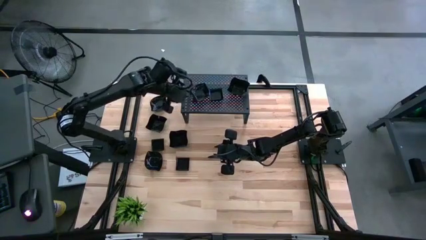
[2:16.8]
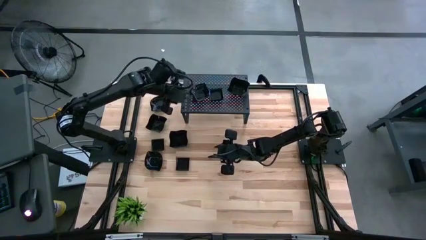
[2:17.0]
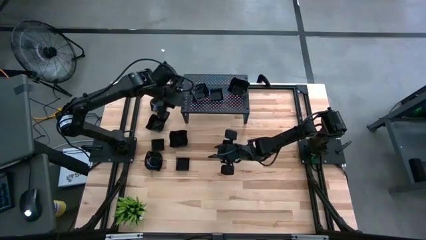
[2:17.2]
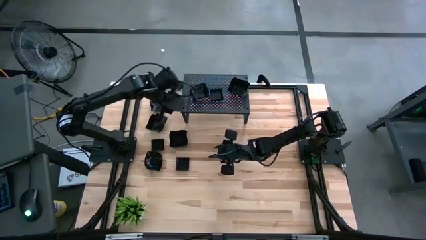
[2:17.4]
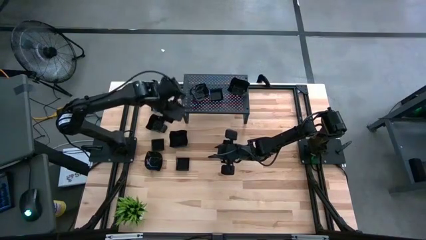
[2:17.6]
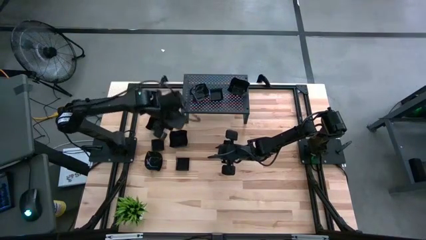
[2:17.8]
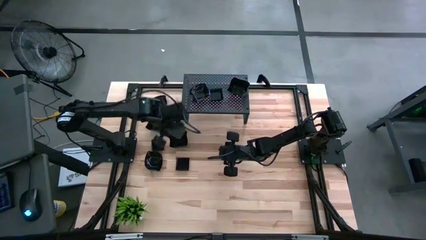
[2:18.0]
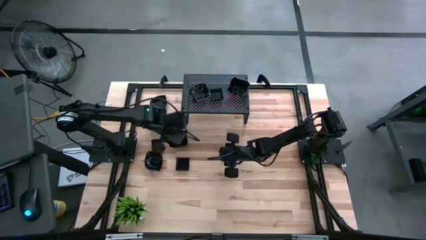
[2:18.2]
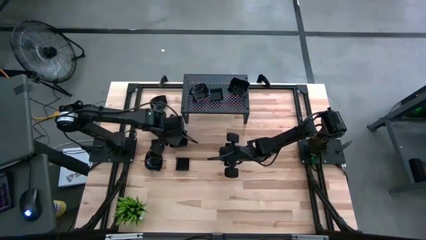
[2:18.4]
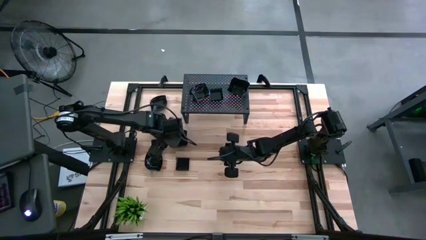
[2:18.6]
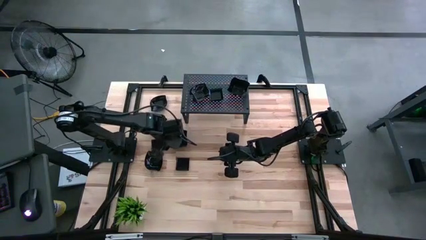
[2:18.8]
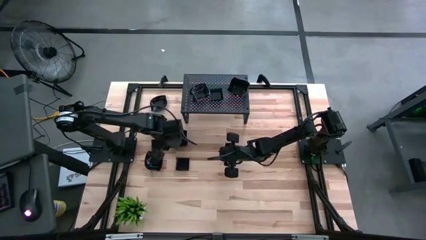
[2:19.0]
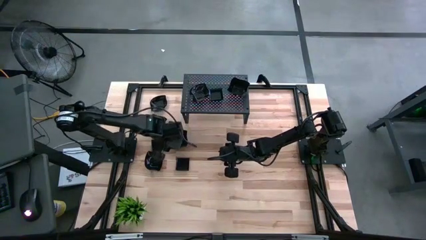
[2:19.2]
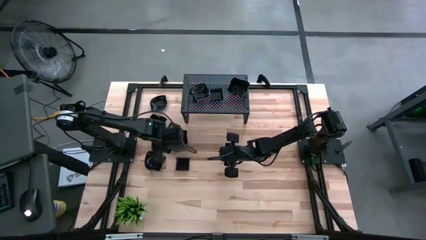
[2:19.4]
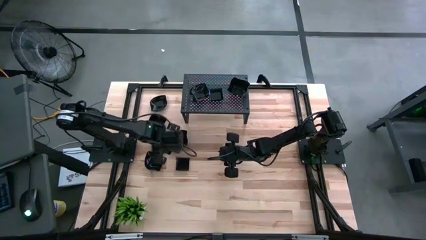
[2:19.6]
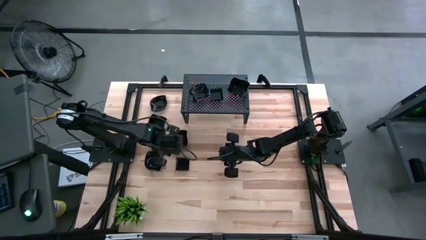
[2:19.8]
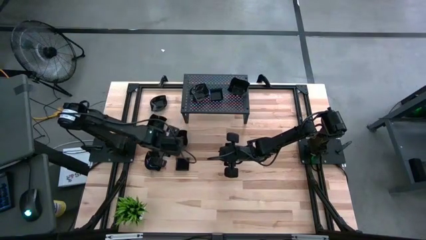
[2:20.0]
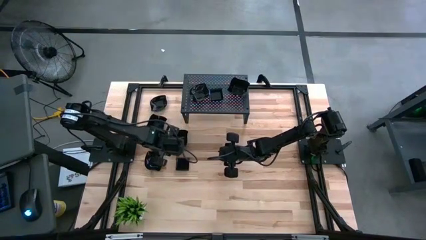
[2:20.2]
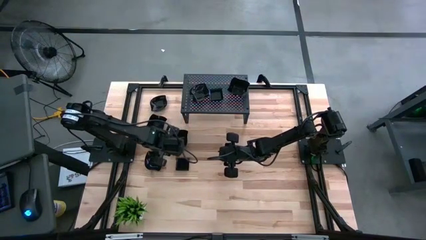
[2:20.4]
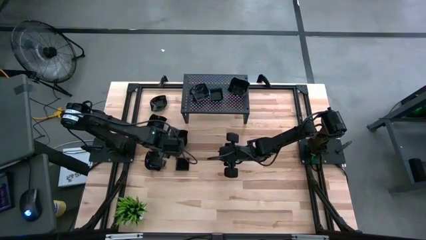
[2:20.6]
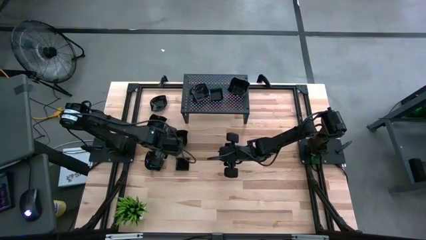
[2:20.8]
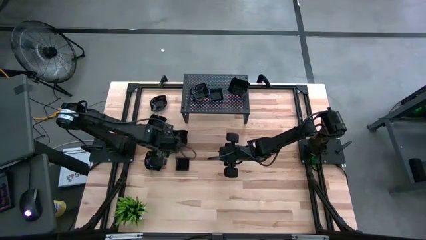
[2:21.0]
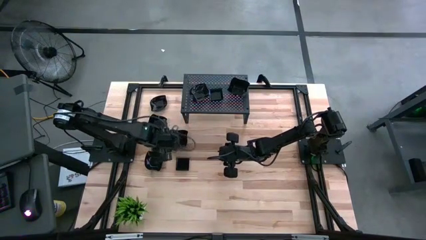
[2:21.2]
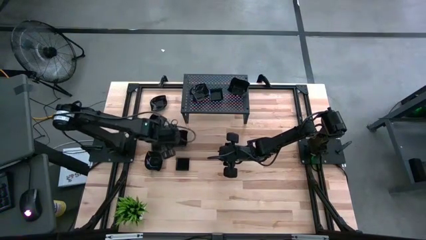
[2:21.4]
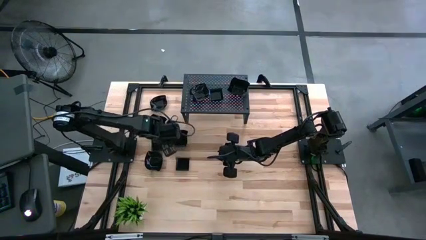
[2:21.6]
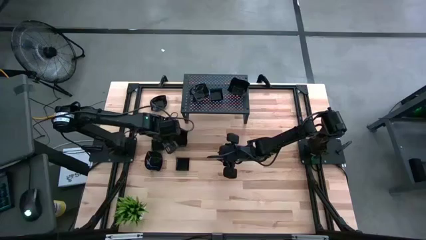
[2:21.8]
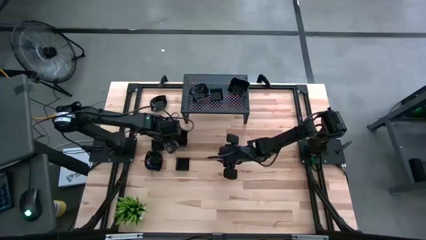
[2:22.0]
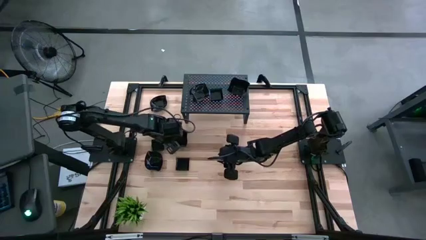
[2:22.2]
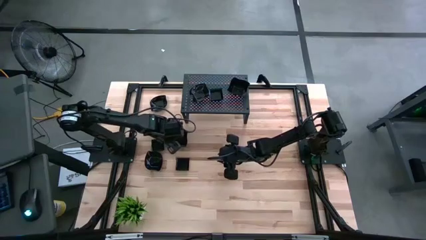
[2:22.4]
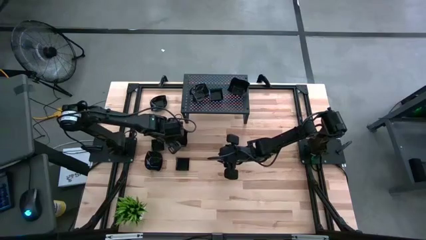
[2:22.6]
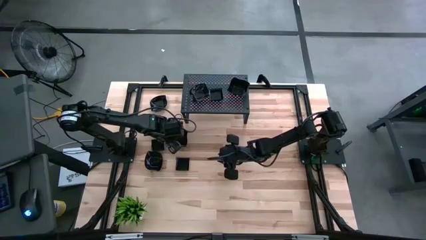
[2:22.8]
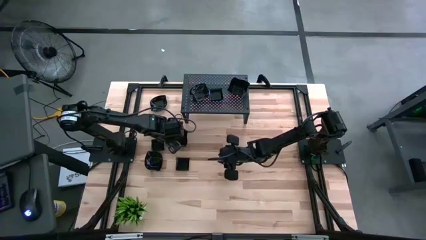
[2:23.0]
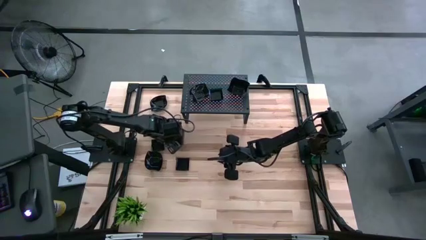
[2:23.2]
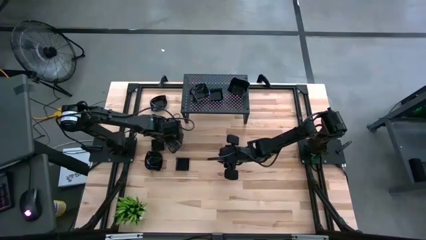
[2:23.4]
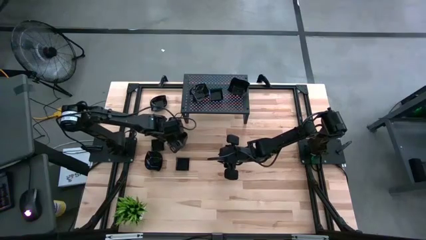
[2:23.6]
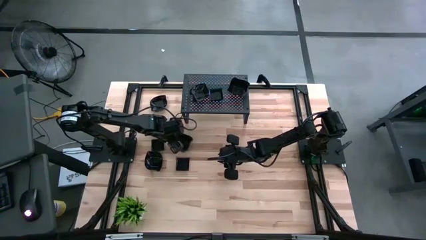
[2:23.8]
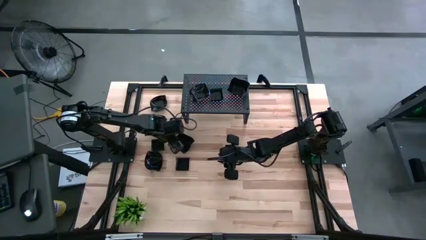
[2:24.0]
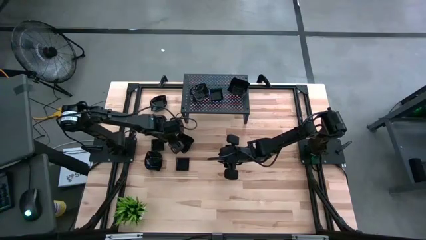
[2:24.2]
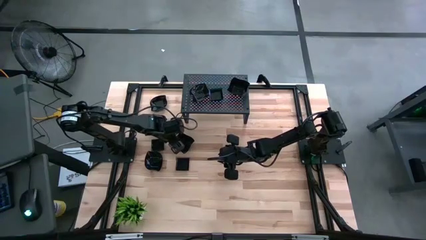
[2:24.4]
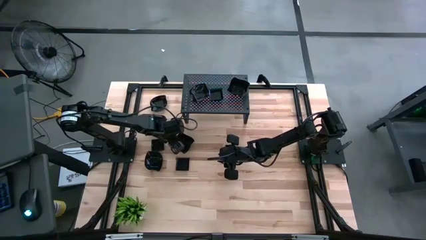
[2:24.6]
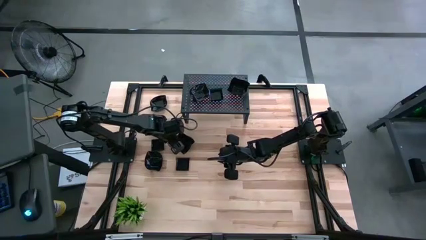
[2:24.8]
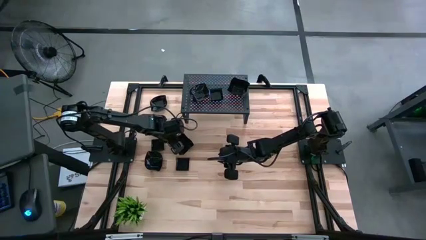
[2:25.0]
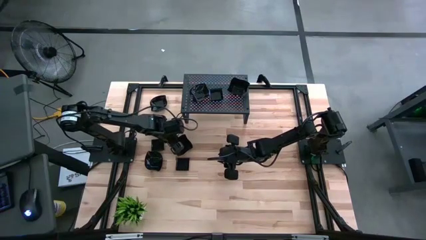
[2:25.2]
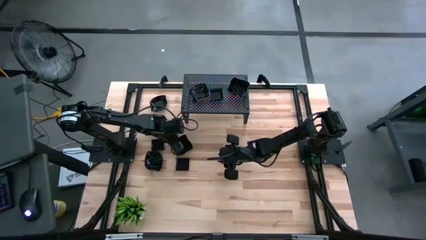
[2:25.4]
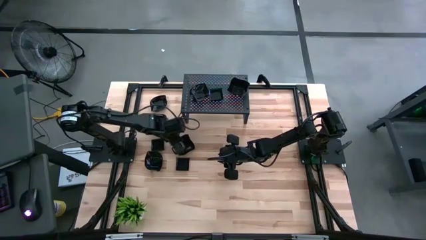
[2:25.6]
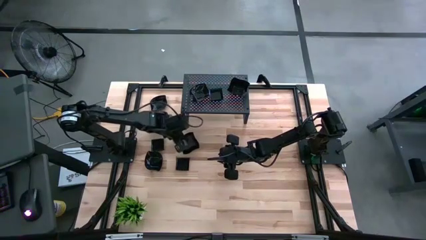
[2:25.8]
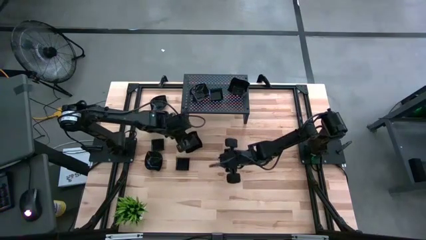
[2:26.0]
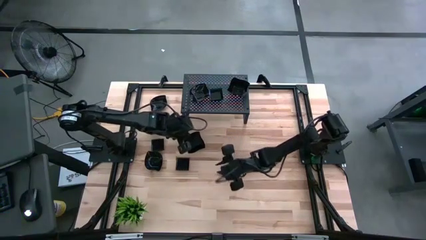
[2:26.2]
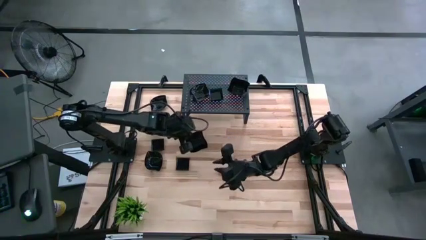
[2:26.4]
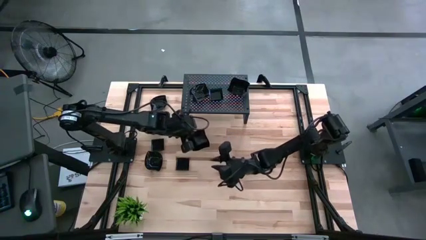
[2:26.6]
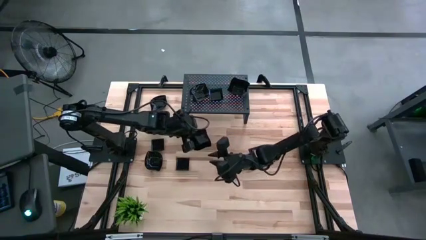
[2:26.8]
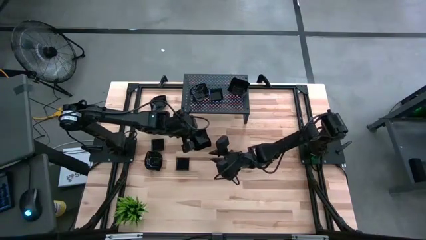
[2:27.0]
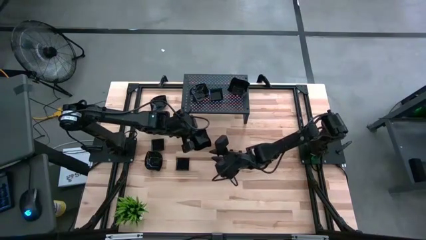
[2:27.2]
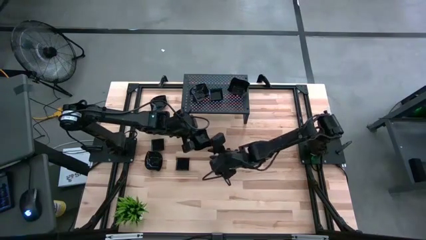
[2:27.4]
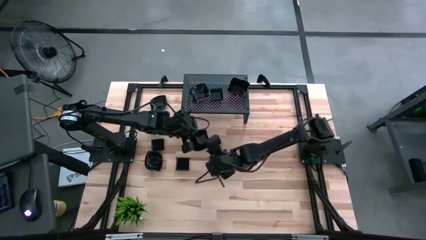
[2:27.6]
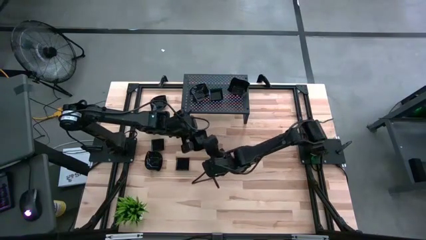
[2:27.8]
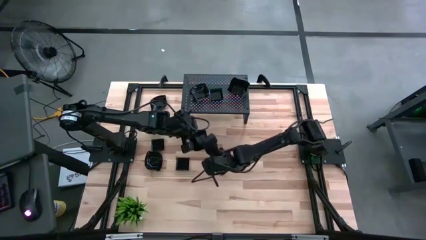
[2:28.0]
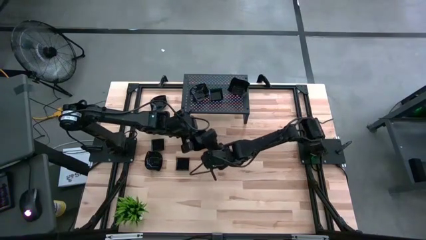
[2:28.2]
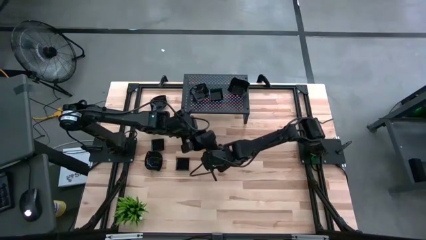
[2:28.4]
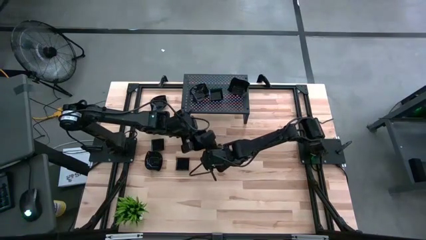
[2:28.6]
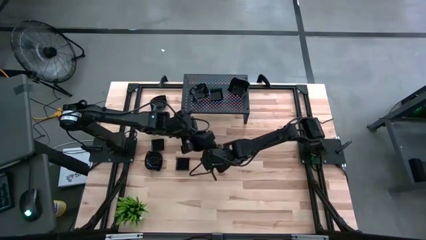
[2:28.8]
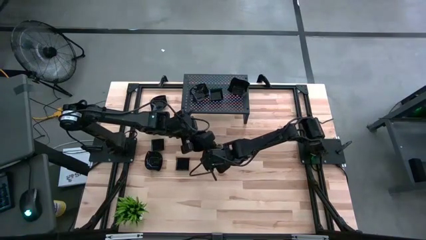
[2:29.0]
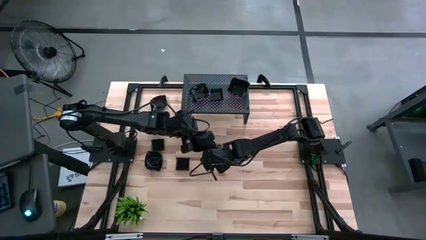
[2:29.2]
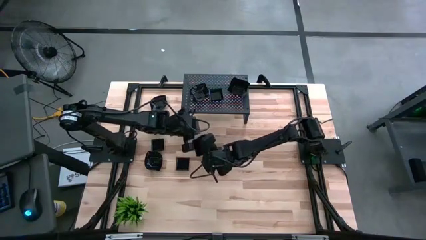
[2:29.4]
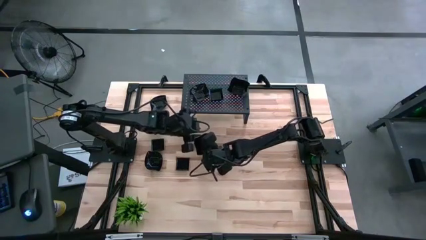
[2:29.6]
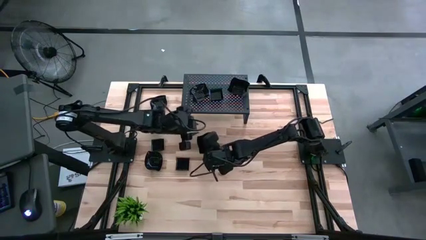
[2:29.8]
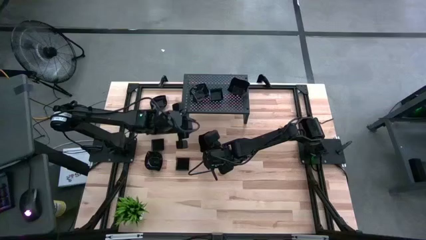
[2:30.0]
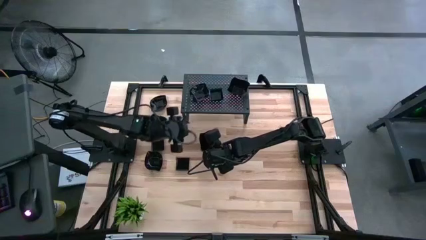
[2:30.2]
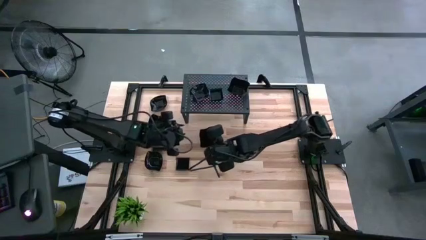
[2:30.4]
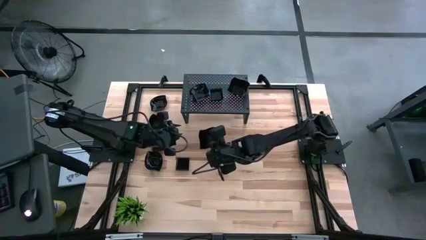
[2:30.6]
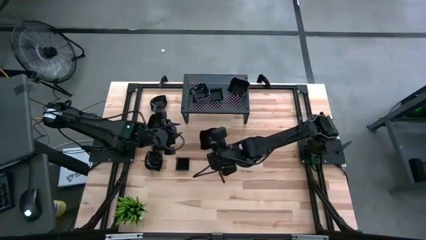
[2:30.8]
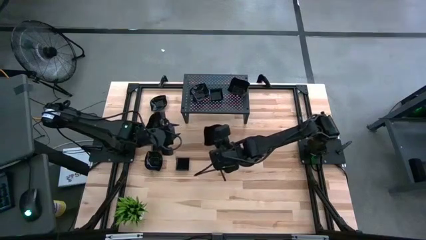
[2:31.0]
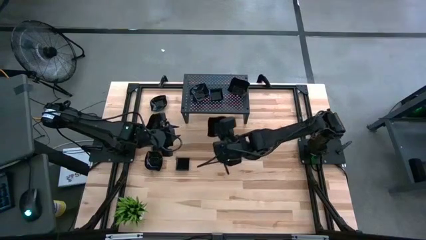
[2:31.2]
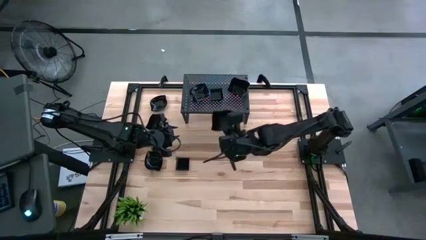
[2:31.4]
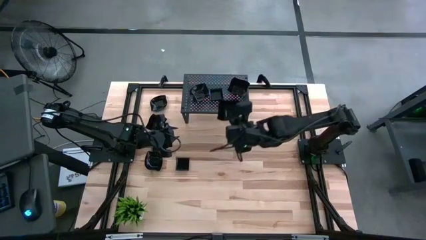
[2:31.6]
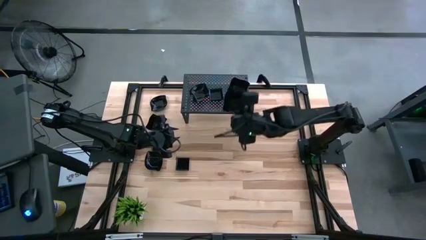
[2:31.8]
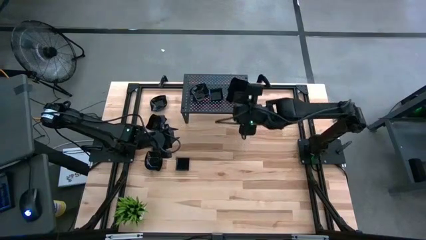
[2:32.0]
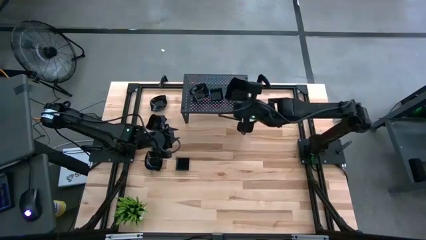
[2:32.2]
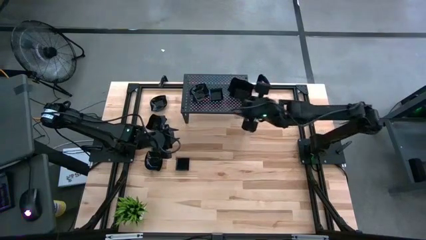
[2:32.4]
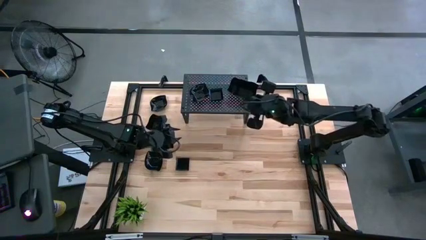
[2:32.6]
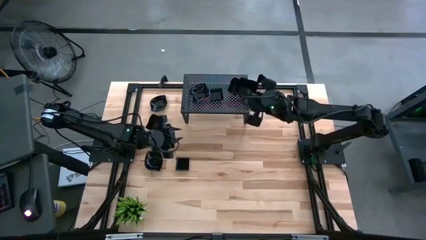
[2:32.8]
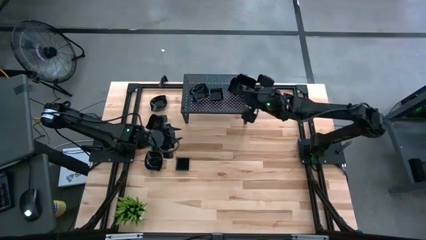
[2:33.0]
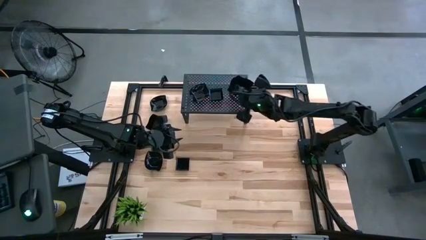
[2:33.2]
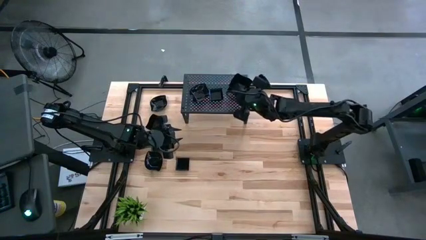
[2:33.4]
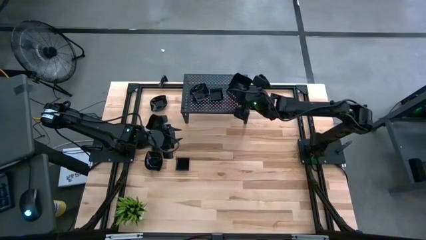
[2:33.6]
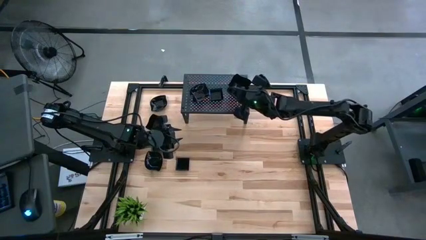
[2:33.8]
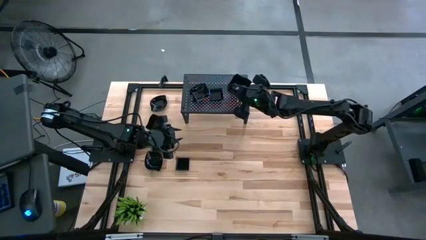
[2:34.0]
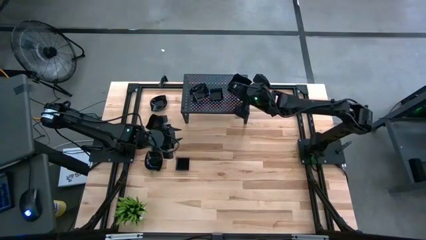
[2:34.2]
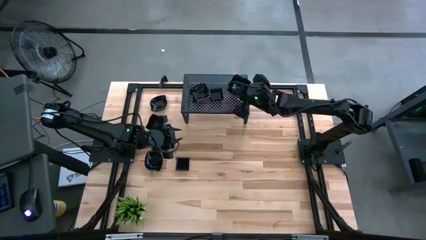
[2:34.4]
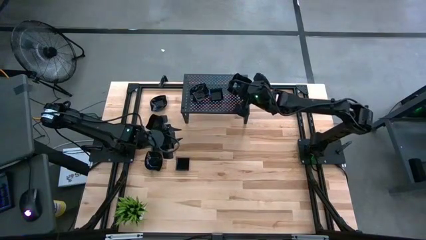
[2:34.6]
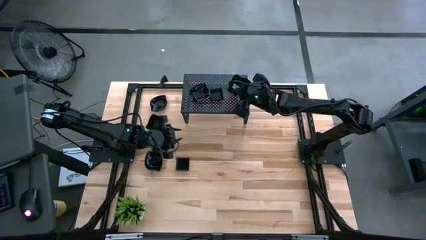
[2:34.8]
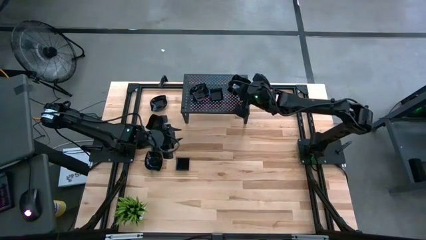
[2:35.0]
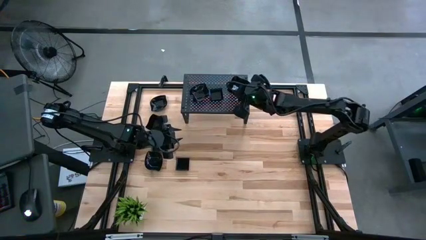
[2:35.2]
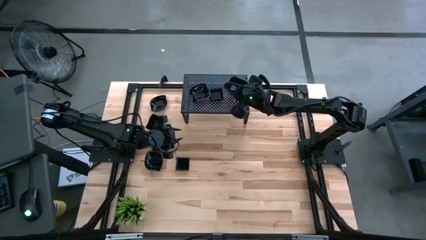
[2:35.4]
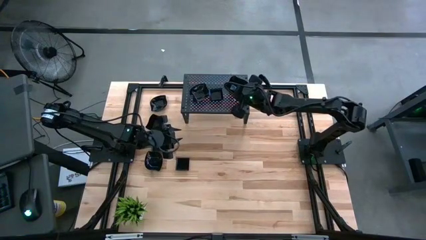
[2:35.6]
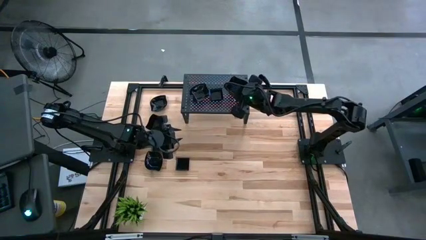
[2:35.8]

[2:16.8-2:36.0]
Task: Pick & Place Mini shaped plates
Stack the black distorted square plate on top of the black distorted square plate on the shelf
